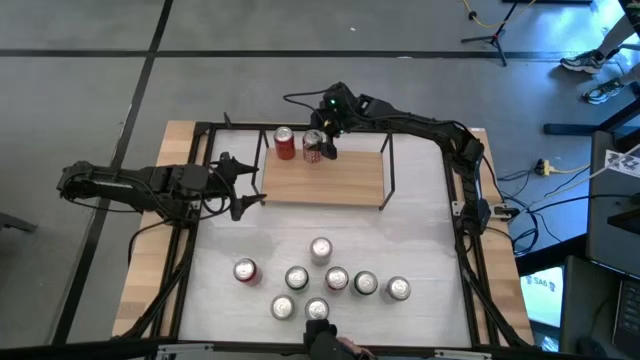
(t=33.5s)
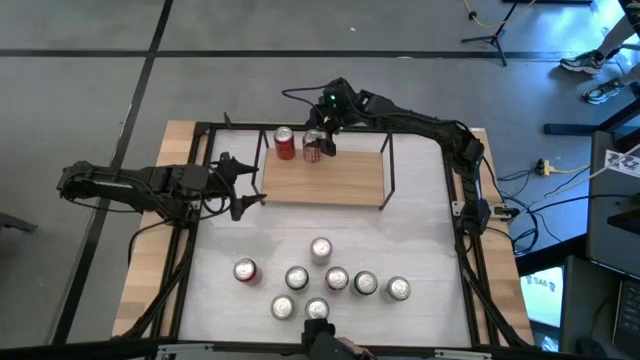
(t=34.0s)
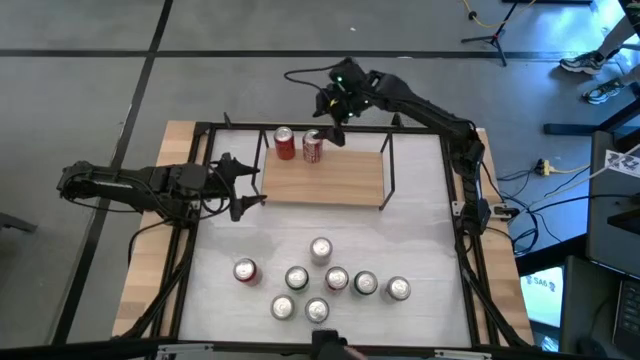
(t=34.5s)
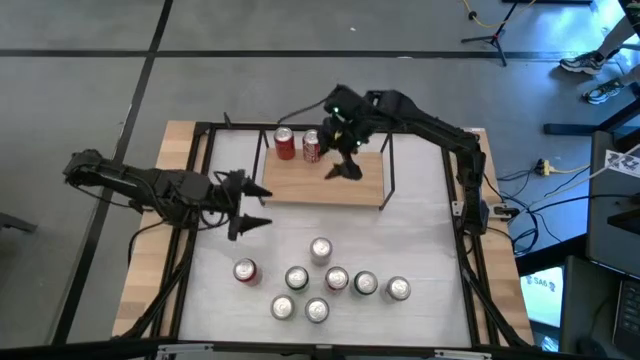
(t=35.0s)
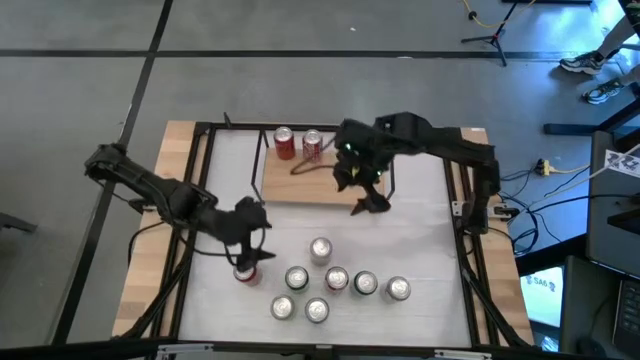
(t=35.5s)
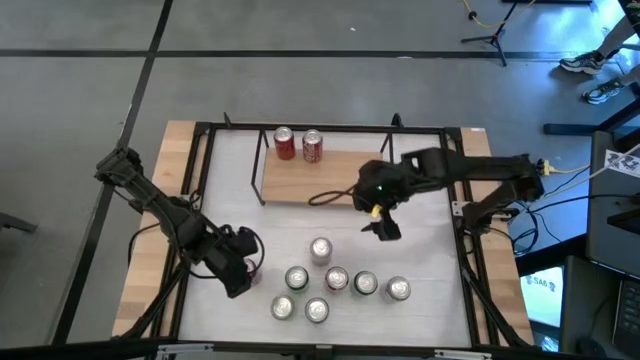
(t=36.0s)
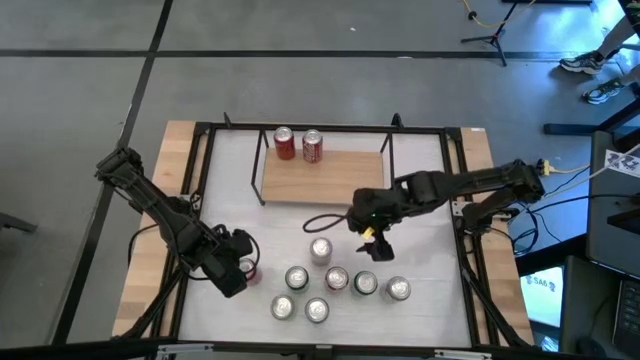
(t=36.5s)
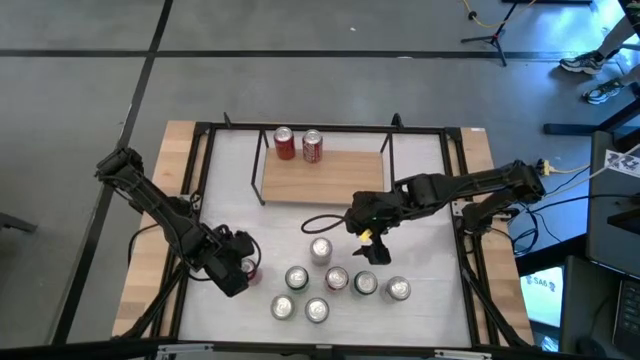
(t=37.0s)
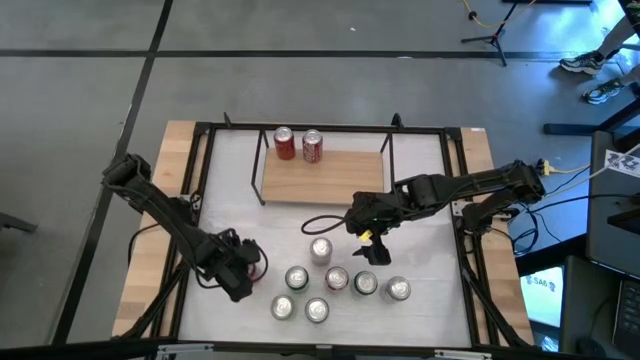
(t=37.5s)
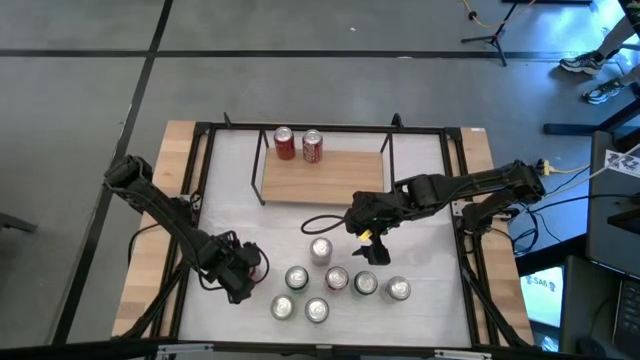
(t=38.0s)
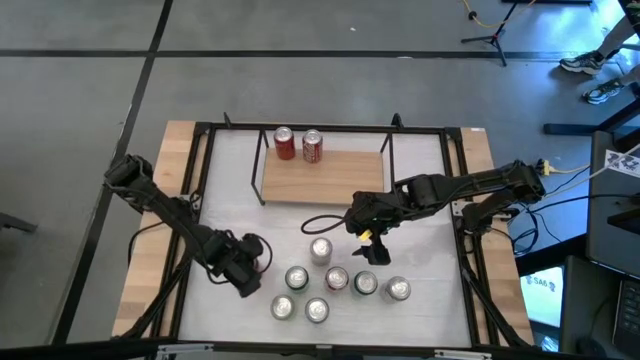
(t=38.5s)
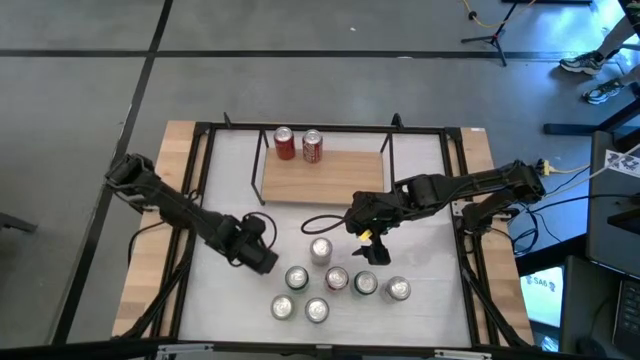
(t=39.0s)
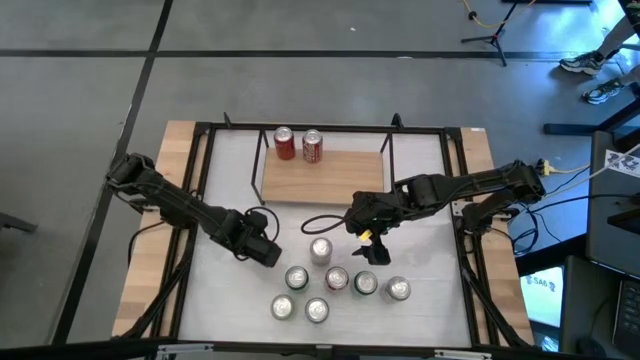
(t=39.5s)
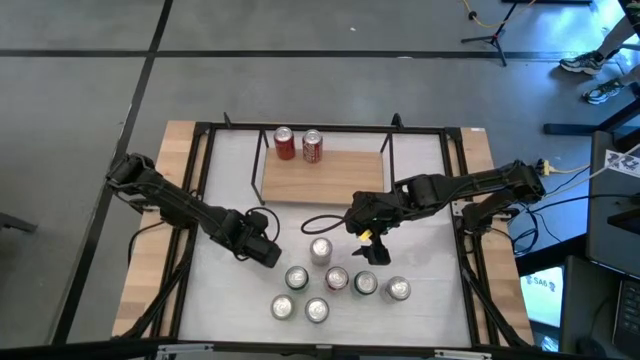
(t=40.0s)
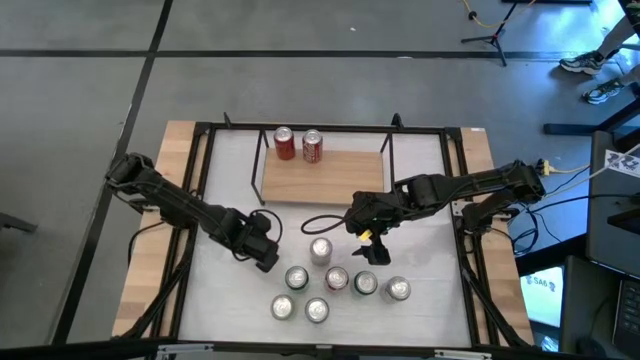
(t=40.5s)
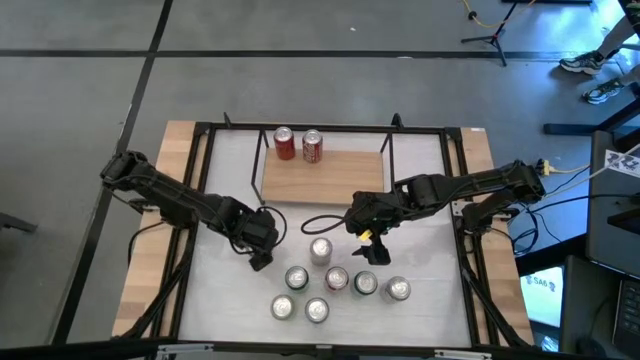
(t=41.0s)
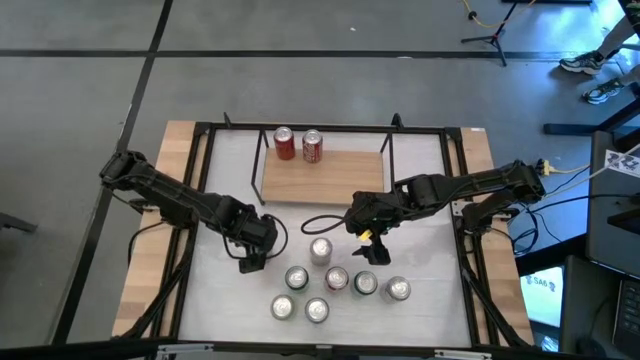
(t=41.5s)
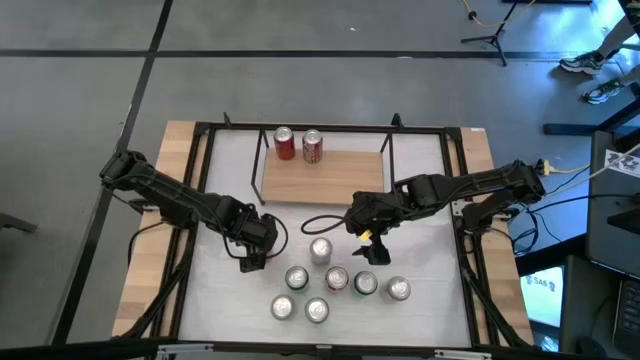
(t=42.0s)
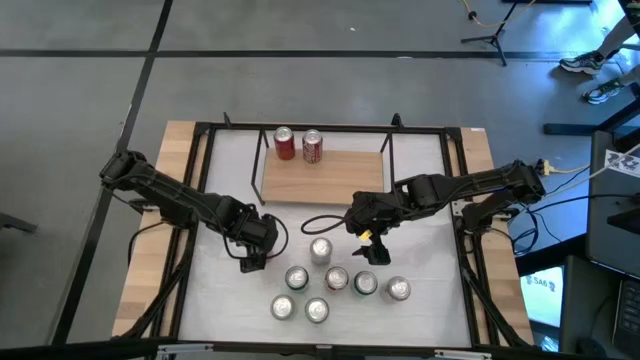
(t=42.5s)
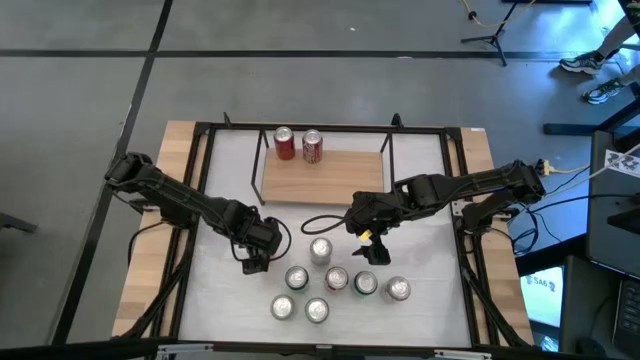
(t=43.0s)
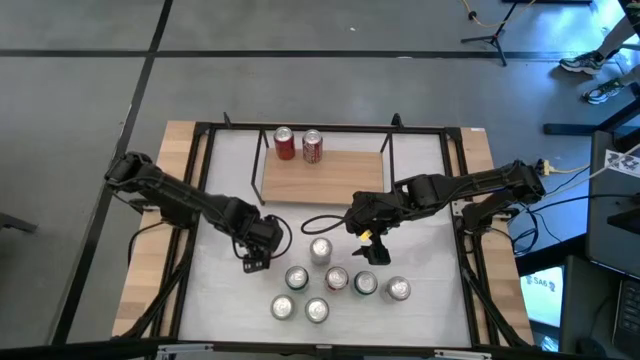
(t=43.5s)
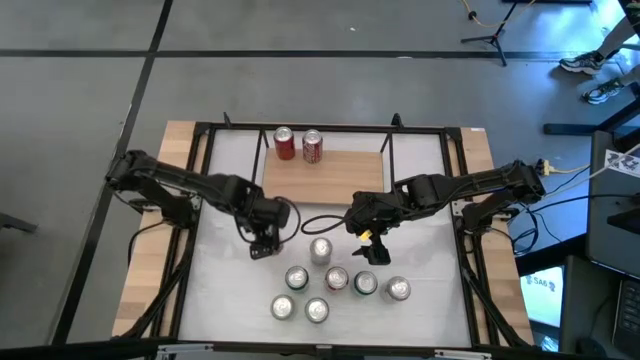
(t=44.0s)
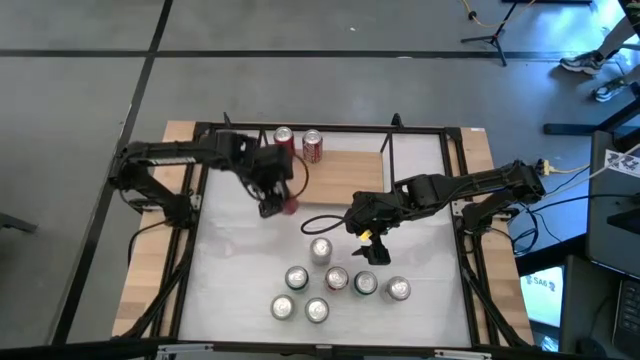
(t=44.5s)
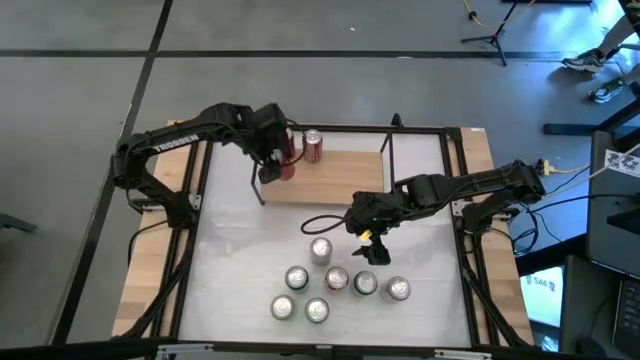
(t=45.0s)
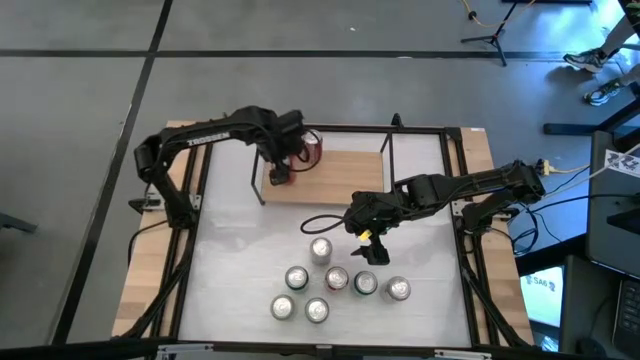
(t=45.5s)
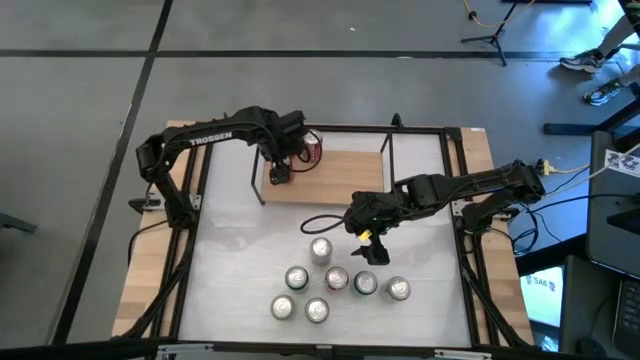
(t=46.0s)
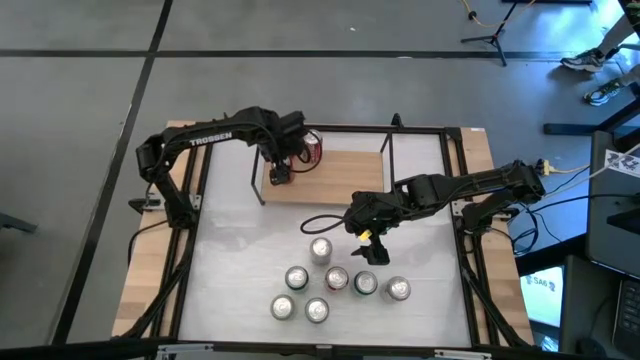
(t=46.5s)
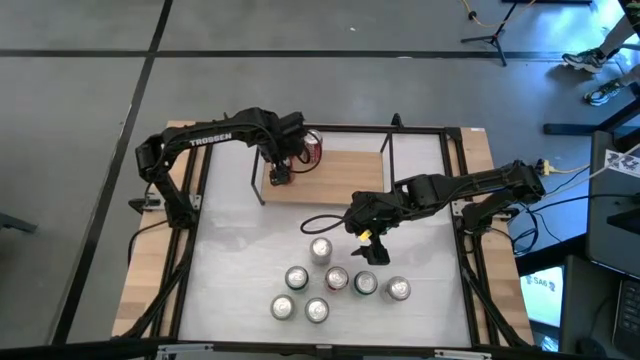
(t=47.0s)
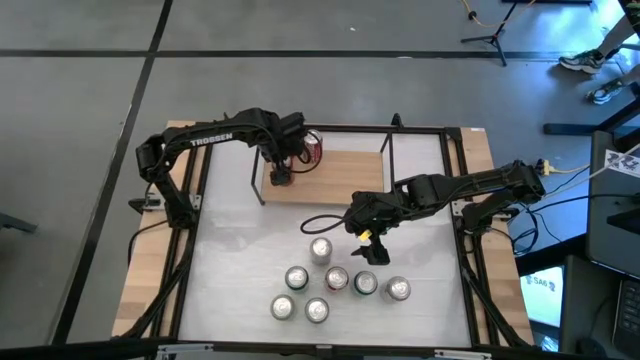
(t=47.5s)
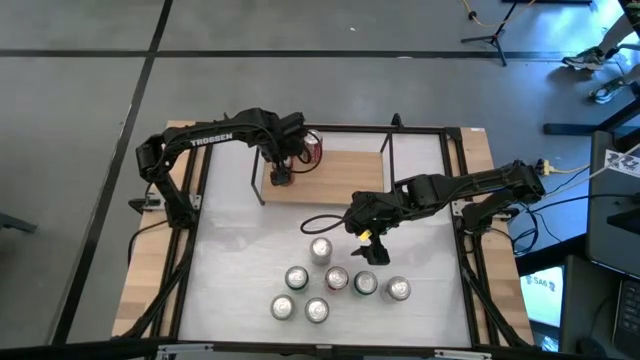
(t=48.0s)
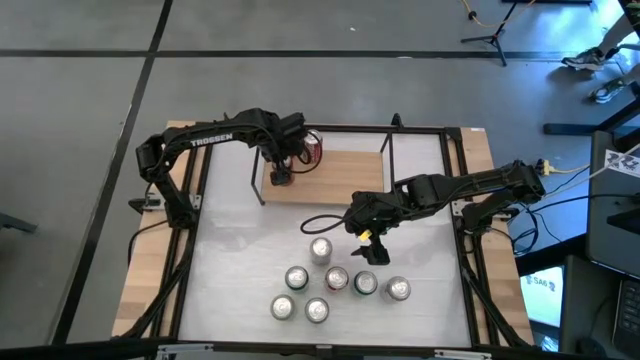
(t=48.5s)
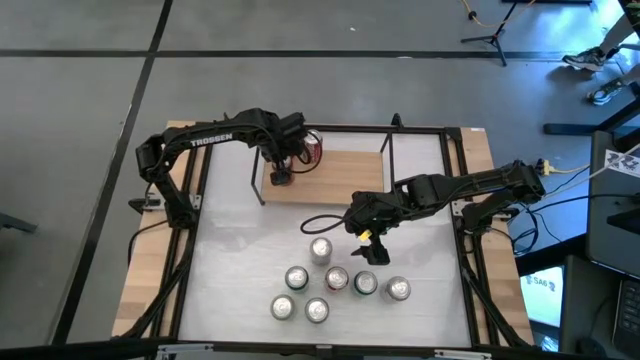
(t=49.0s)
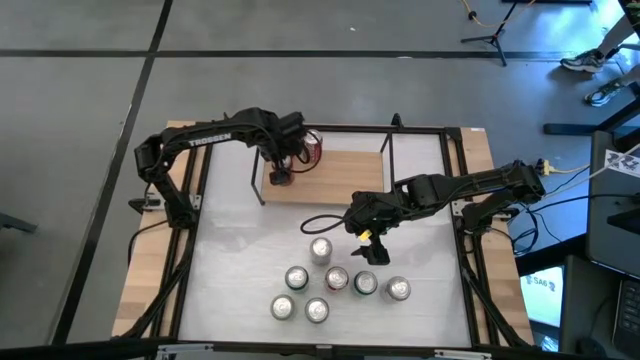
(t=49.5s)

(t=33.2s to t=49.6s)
Task: Place canned beverage on shelf
Put the red soda can on the shelf aligned with the other red soda can
